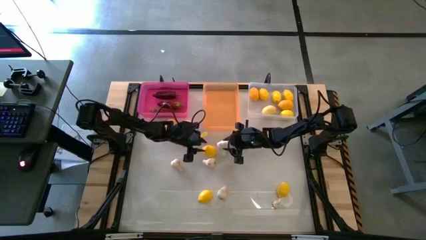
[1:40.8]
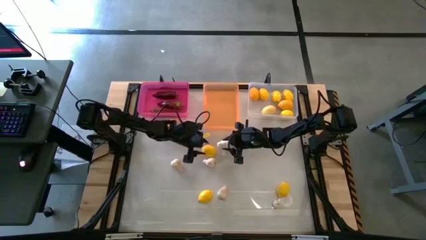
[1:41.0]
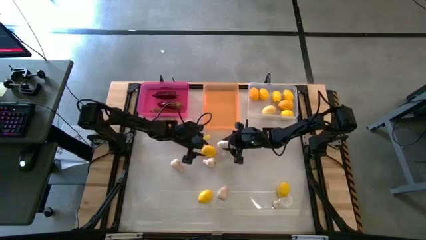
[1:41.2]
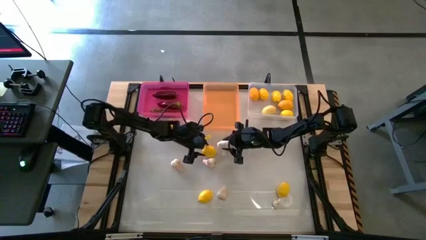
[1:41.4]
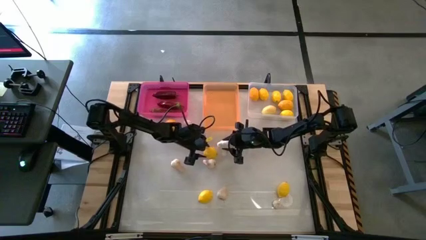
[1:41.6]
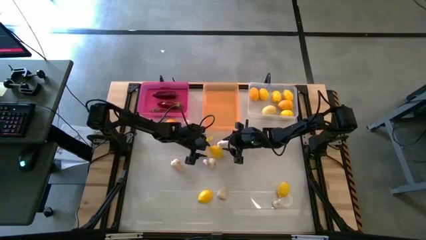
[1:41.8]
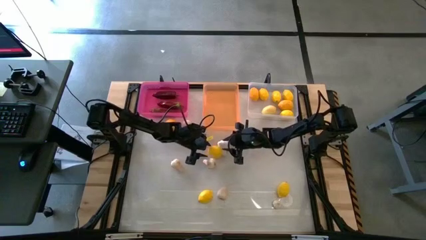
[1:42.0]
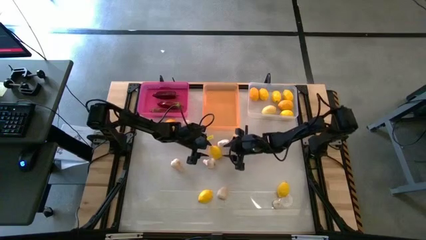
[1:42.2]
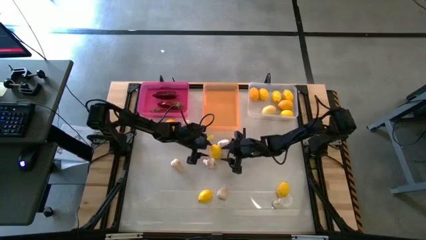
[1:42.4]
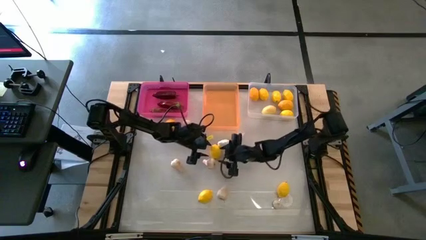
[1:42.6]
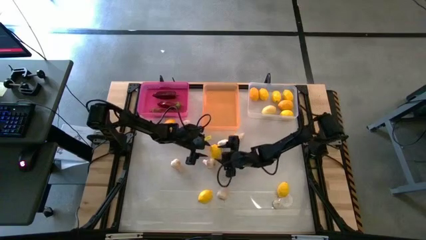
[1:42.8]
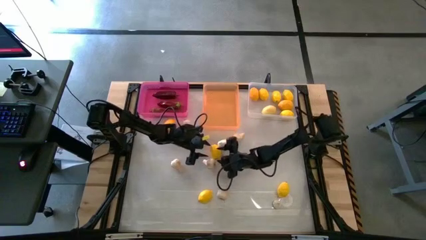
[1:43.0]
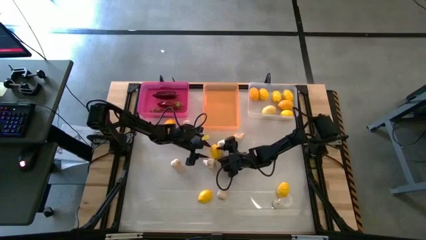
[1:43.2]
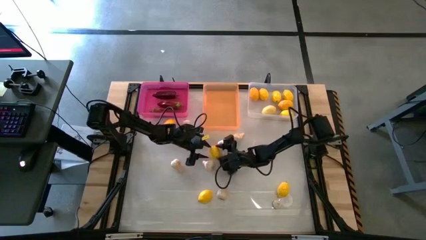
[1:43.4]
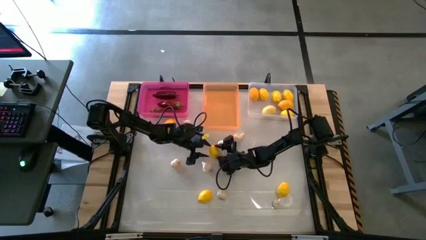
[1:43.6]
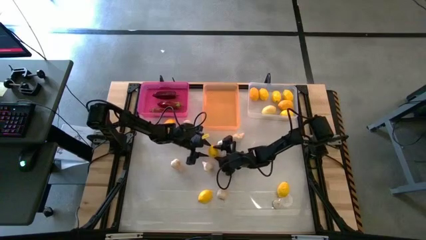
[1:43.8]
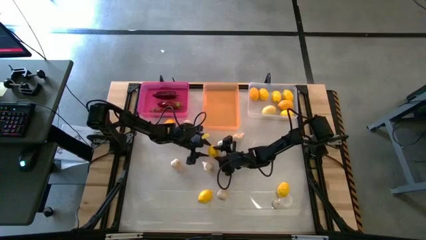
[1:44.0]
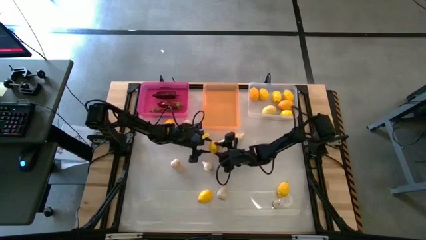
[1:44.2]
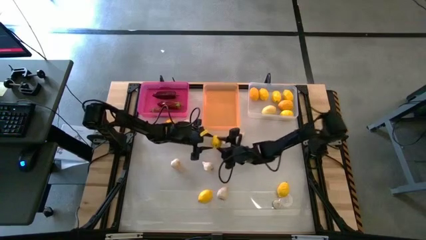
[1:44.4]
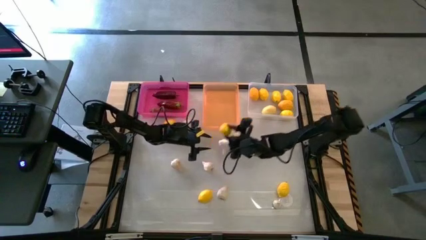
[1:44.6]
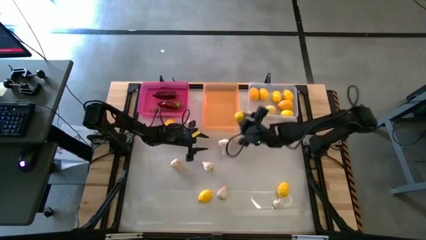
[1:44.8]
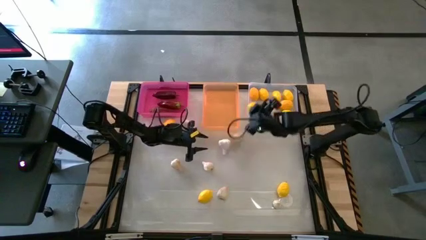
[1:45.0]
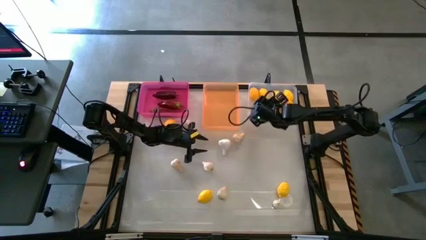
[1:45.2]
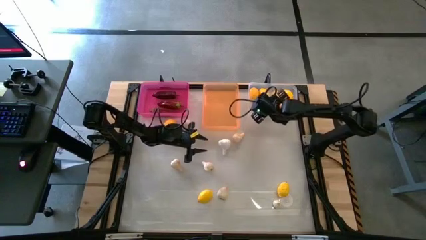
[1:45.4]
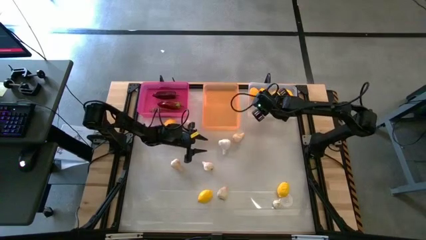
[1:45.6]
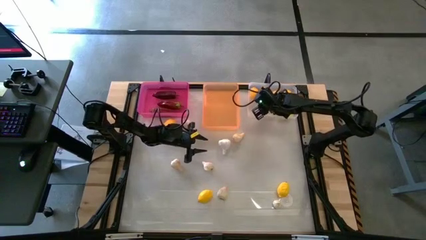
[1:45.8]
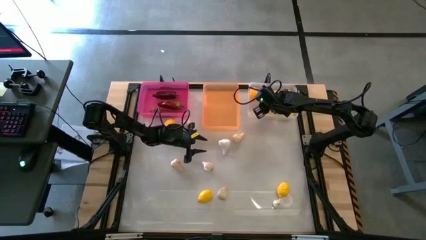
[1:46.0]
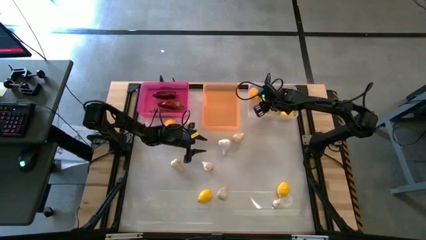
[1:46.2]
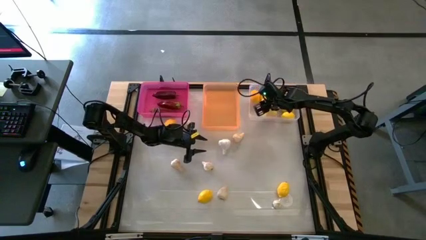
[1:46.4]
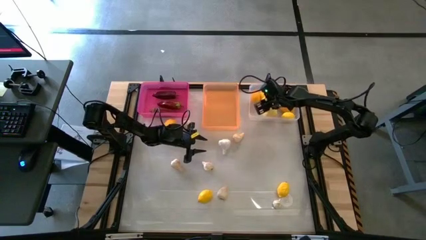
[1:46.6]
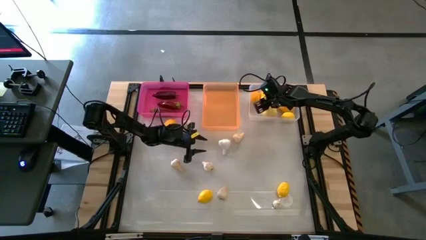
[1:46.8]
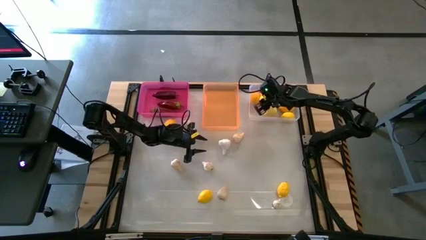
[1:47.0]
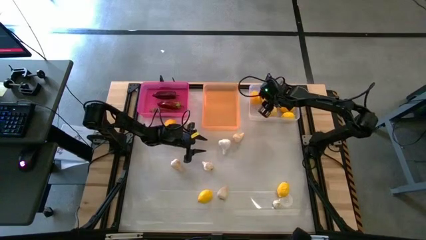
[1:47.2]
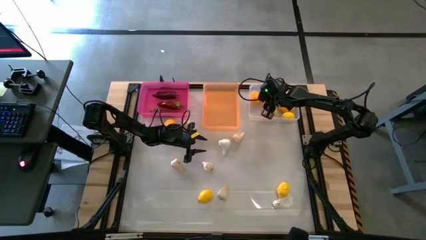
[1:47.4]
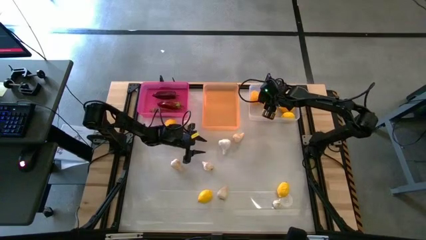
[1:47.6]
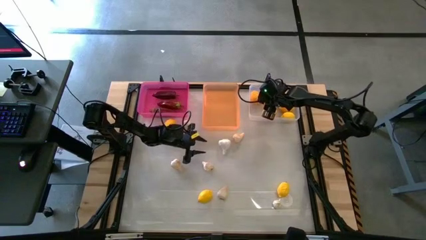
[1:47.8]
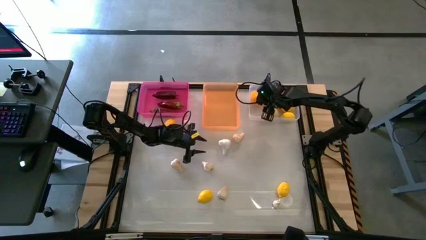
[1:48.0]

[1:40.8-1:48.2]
Task: Sort produce into baskets
Put the yellow lemon into the transparent bin

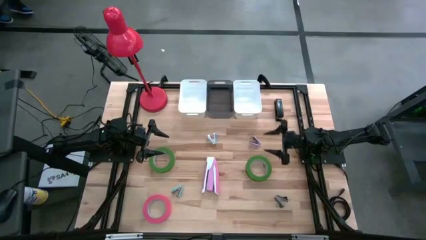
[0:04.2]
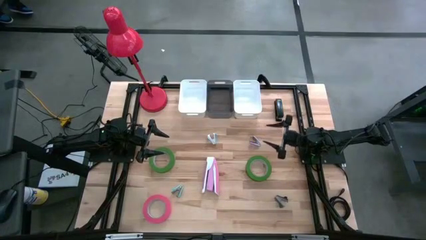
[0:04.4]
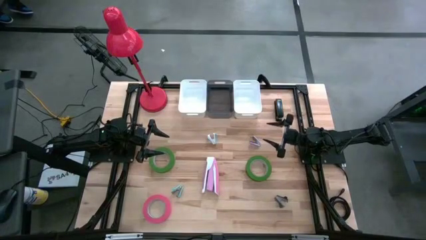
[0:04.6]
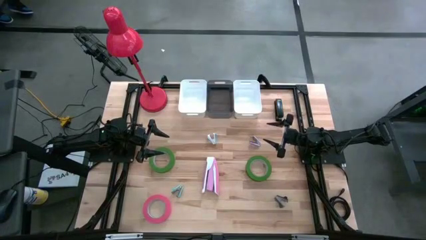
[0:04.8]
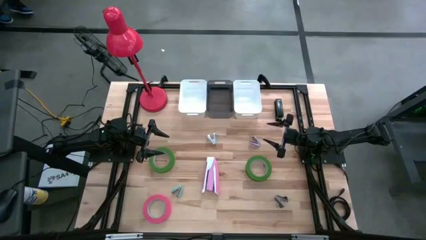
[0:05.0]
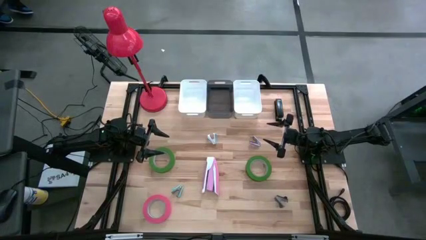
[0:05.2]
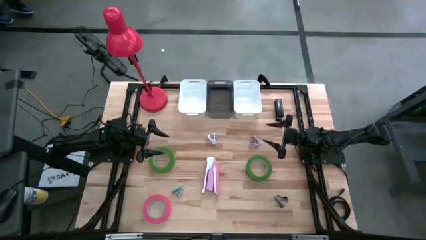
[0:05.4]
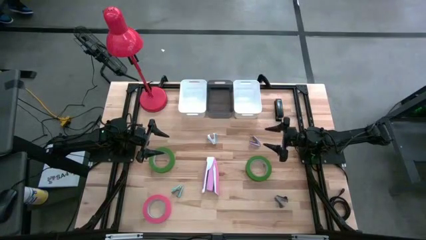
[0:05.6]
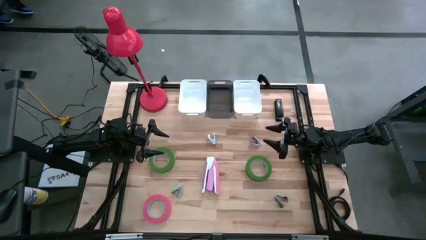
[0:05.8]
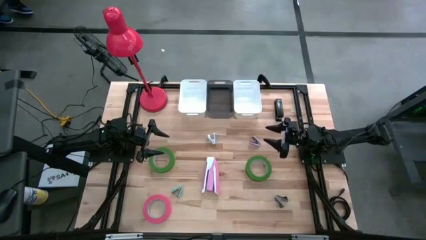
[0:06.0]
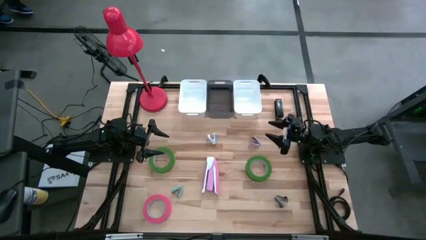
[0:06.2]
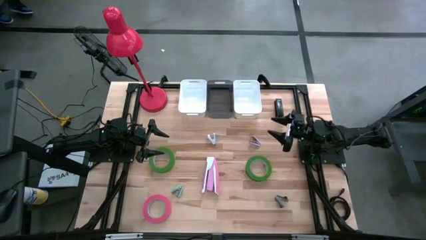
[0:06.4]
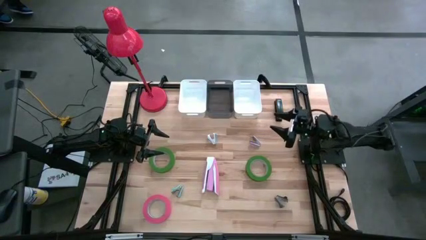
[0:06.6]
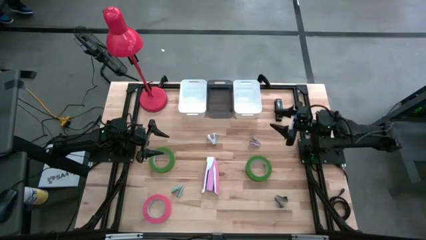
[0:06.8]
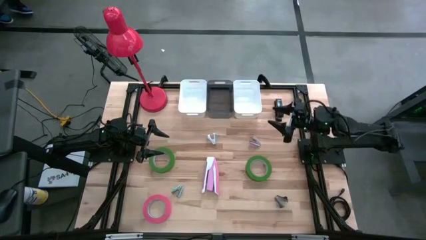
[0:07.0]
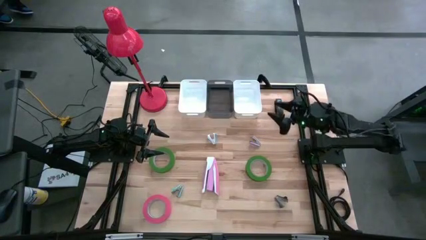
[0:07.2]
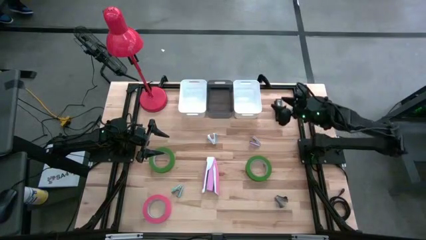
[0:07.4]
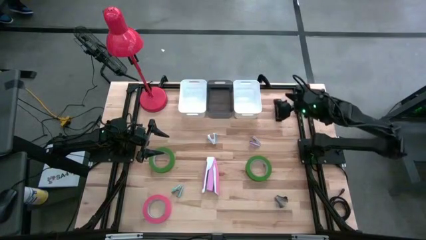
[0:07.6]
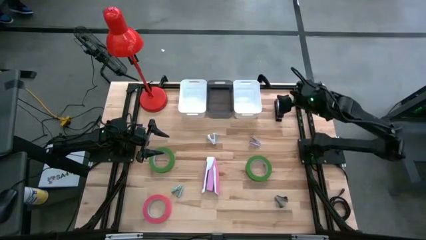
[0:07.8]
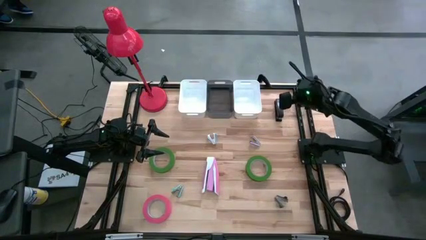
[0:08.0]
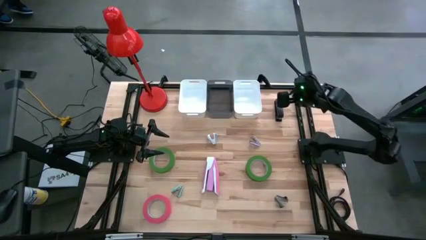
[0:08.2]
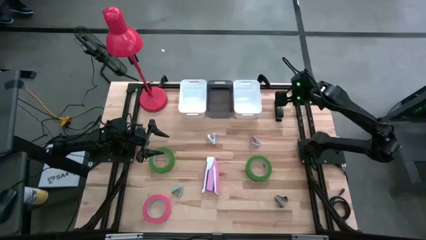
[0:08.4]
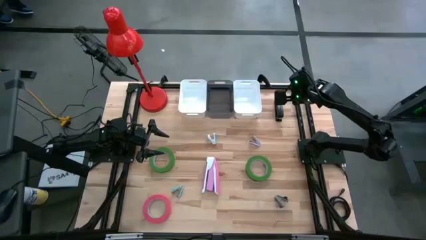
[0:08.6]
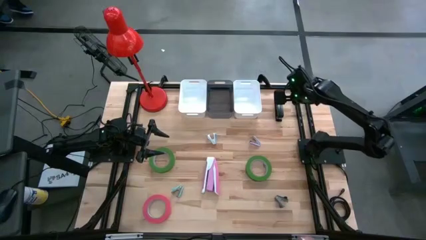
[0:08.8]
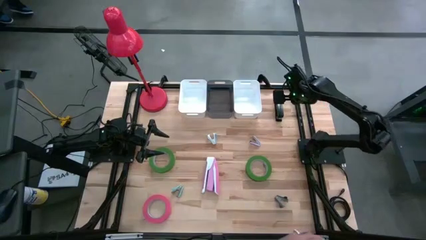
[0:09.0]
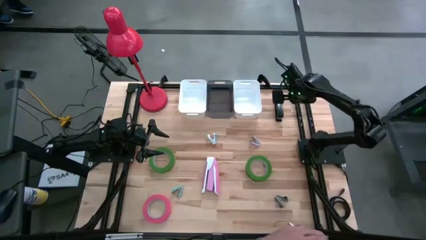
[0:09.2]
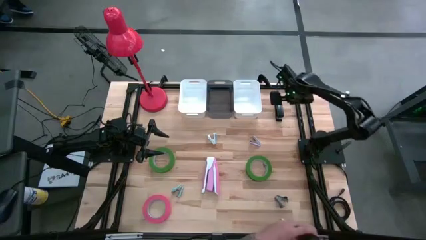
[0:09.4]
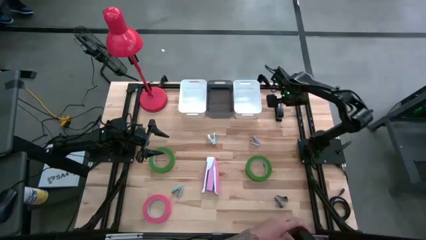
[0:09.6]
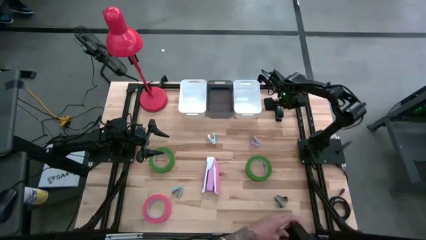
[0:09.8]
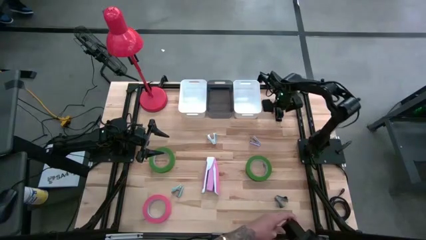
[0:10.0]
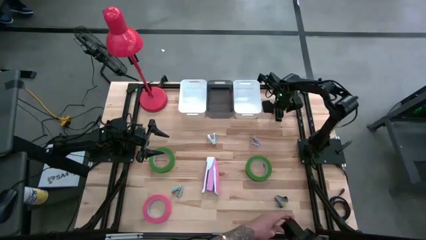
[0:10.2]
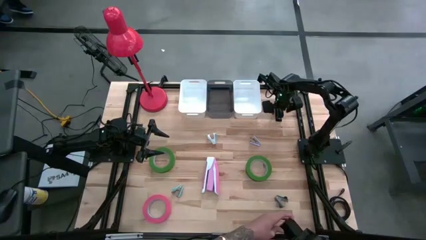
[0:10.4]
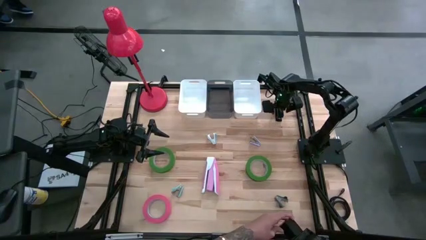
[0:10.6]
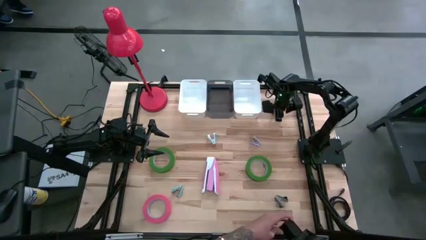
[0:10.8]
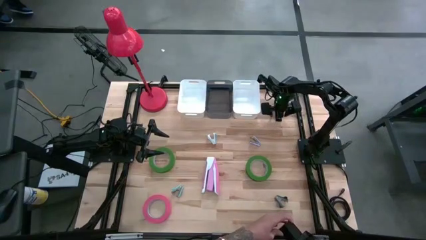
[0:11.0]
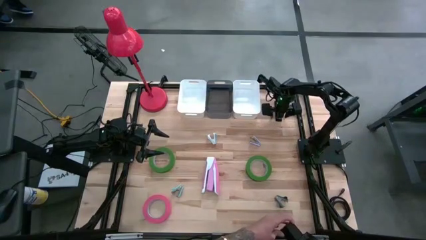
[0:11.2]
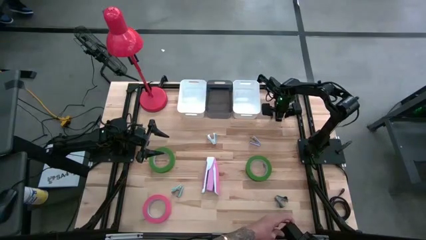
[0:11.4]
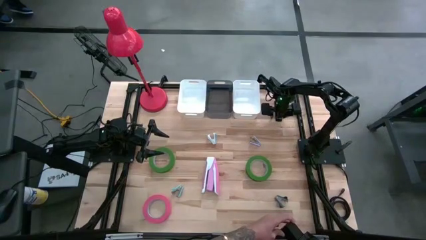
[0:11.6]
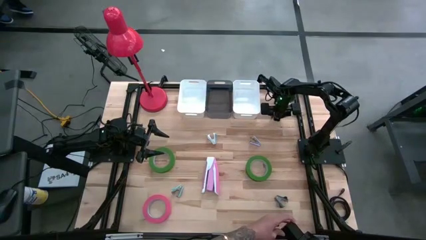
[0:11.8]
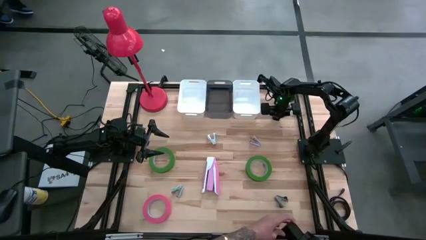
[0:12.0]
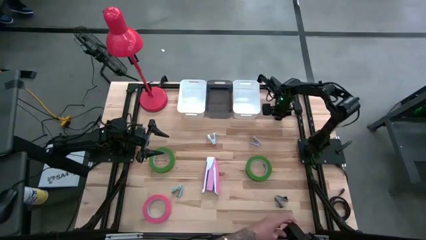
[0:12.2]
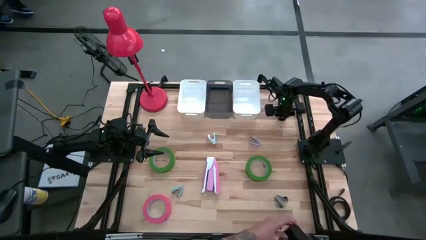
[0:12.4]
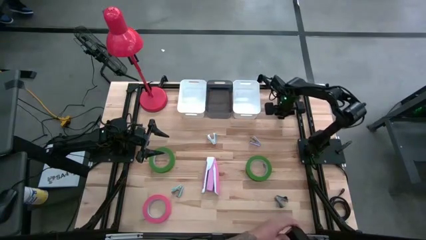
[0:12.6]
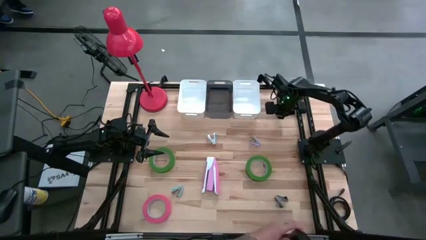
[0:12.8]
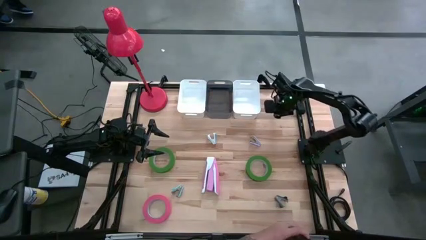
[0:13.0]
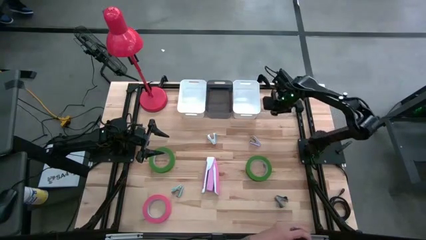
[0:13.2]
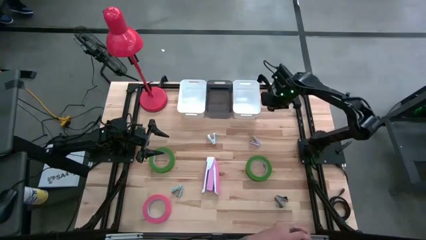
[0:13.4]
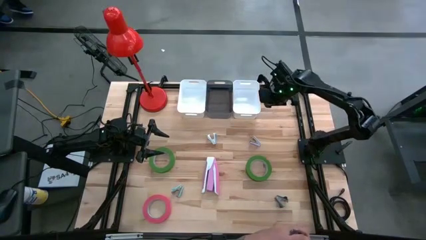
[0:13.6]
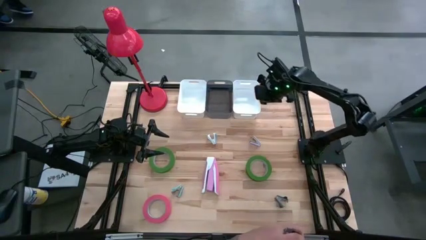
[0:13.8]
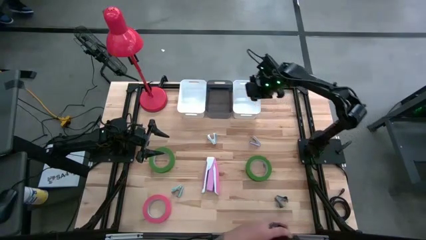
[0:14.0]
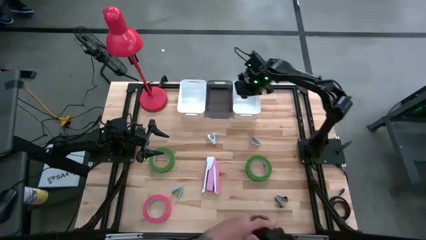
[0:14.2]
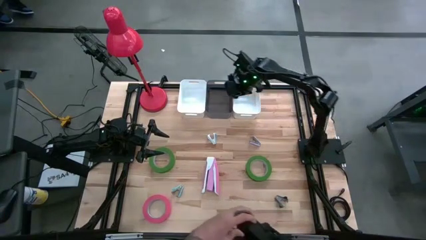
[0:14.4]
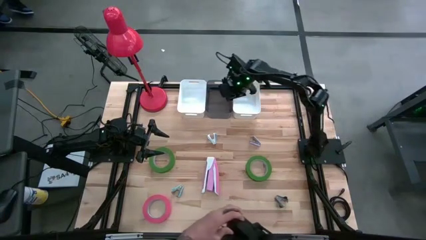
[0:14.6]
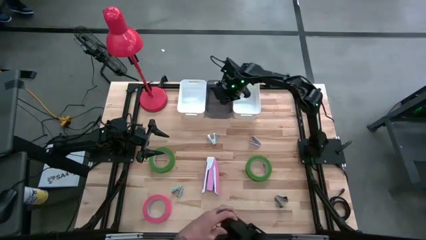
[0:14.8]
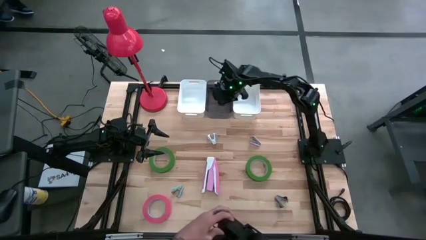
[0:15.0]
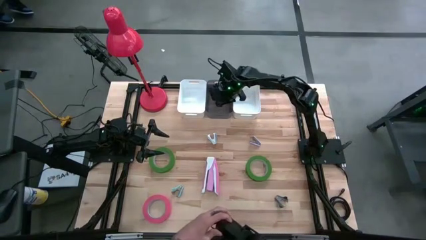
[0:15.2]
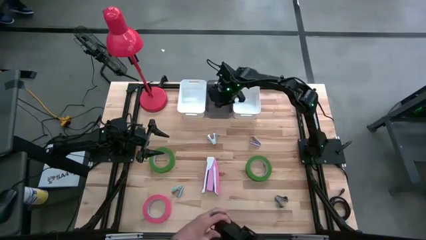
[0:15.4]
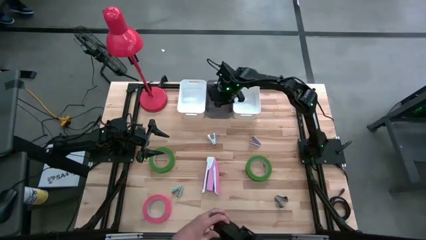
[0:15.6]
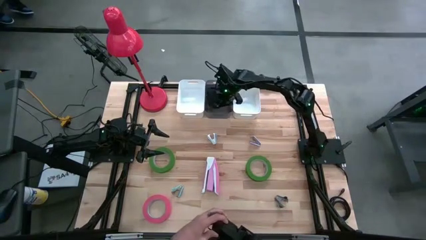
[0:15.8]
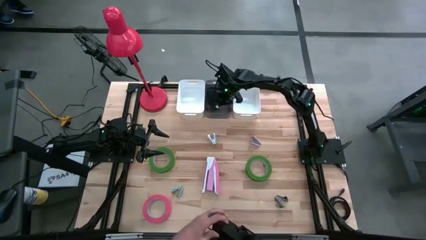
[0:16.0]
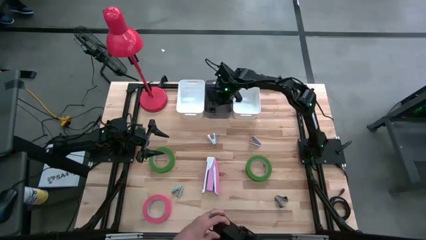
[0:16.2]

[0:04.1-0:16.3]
Task: Pick and place Stapler, Stapler remover, tape
Put the black stapler into the black bin
